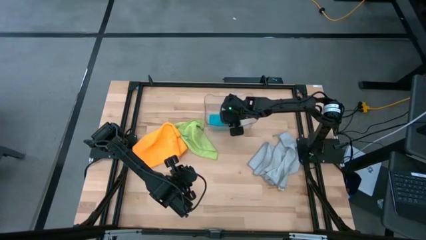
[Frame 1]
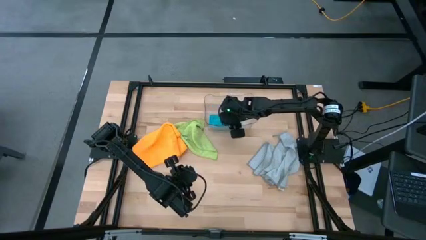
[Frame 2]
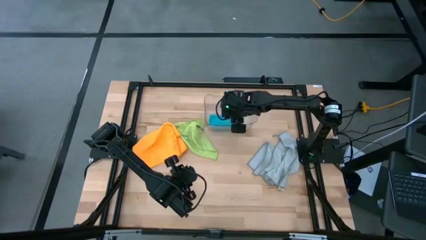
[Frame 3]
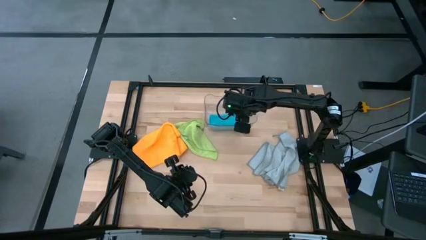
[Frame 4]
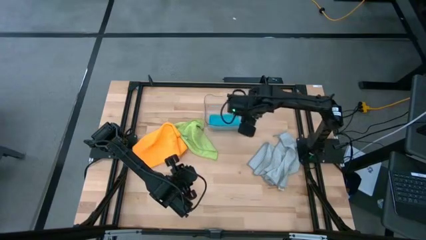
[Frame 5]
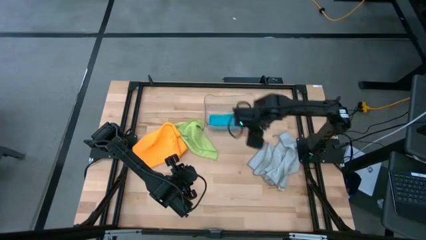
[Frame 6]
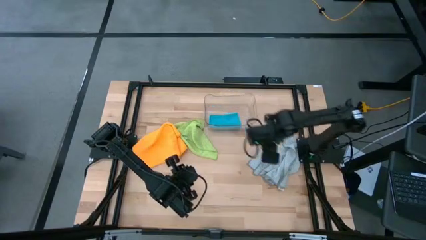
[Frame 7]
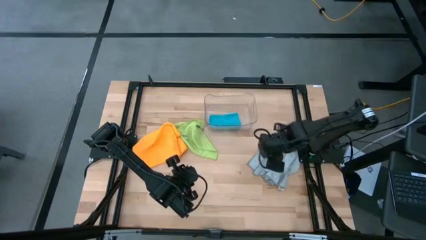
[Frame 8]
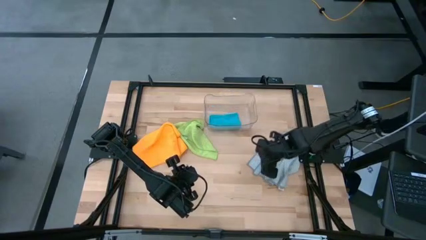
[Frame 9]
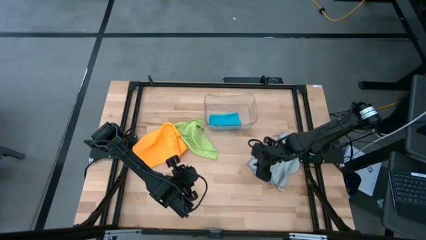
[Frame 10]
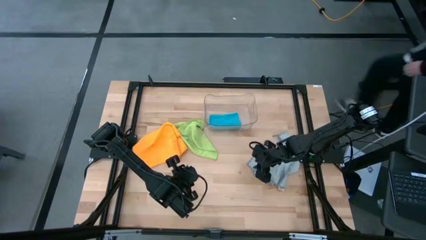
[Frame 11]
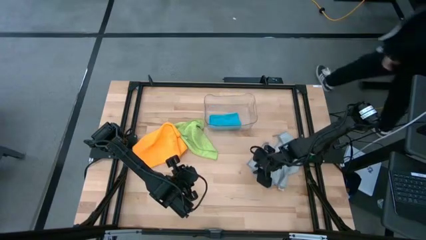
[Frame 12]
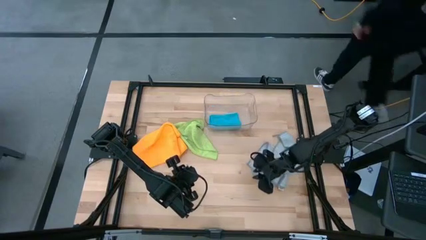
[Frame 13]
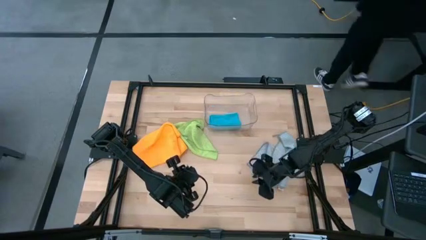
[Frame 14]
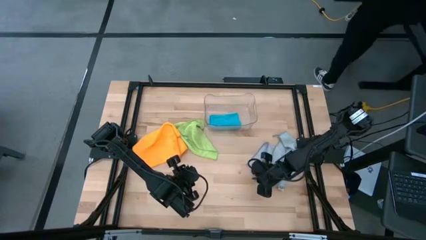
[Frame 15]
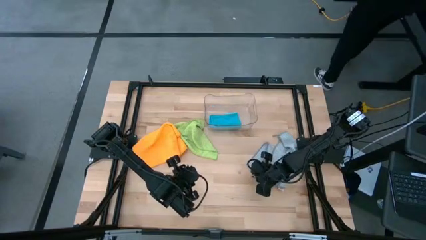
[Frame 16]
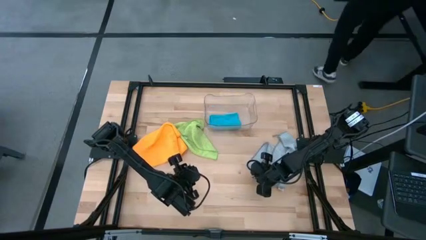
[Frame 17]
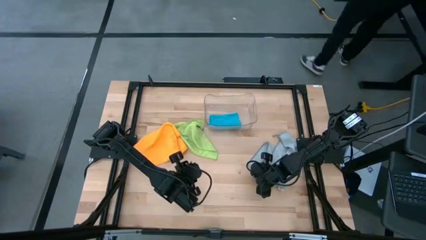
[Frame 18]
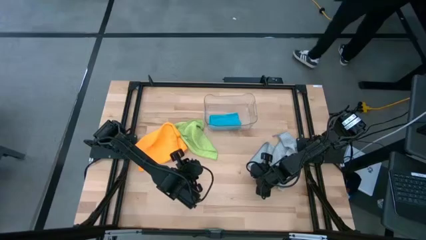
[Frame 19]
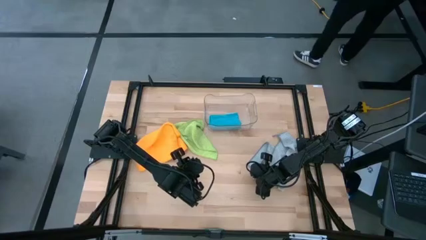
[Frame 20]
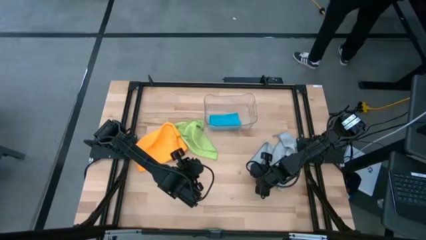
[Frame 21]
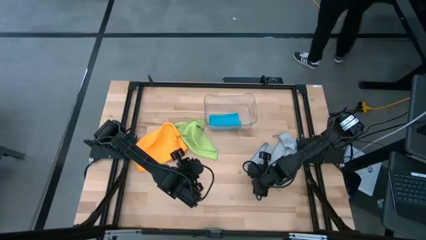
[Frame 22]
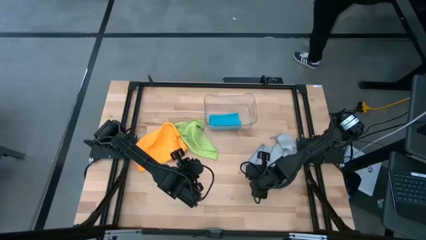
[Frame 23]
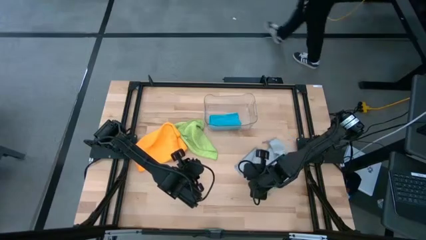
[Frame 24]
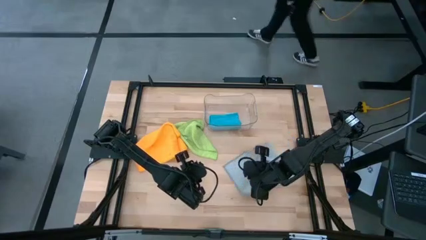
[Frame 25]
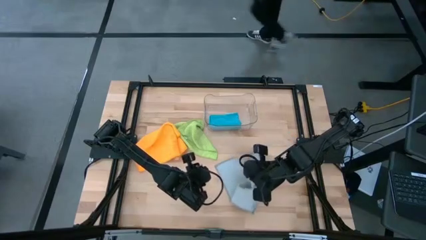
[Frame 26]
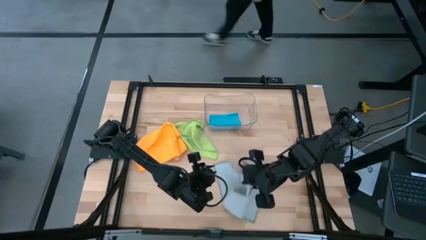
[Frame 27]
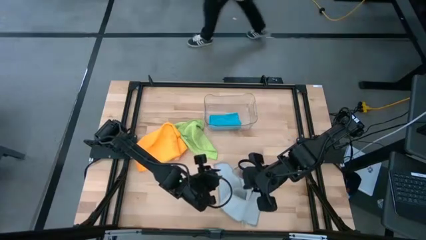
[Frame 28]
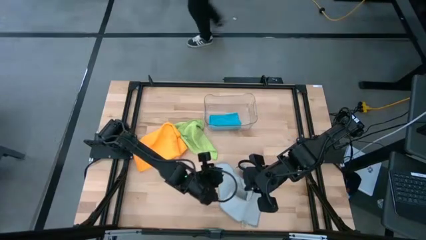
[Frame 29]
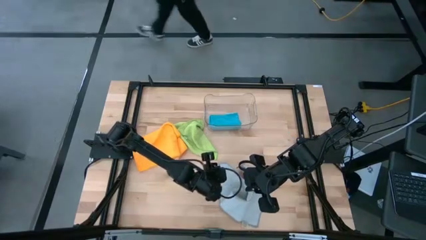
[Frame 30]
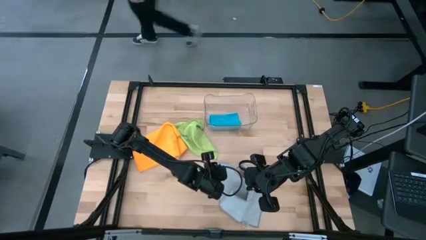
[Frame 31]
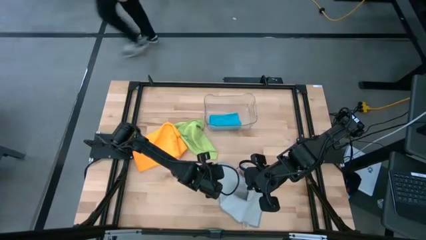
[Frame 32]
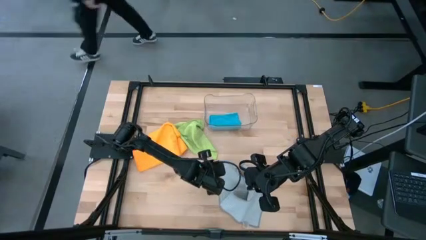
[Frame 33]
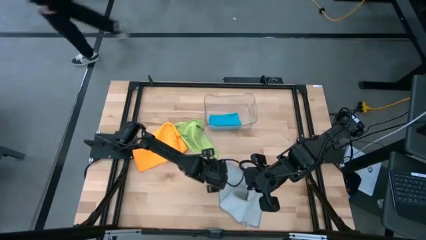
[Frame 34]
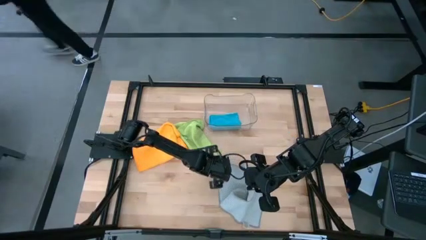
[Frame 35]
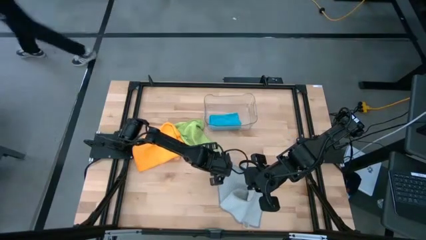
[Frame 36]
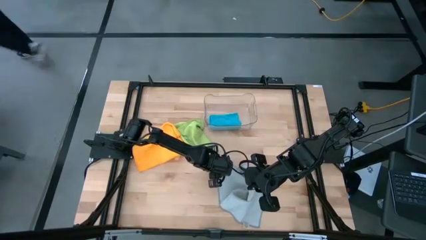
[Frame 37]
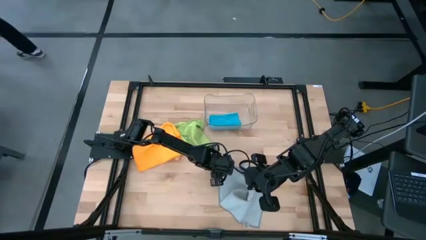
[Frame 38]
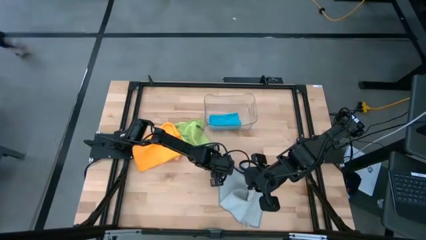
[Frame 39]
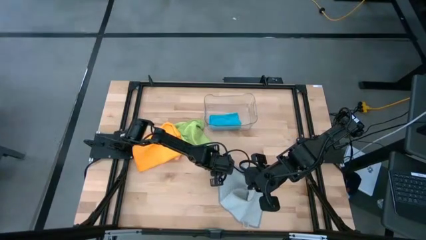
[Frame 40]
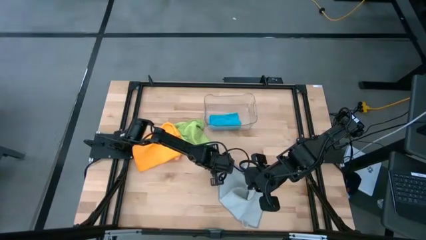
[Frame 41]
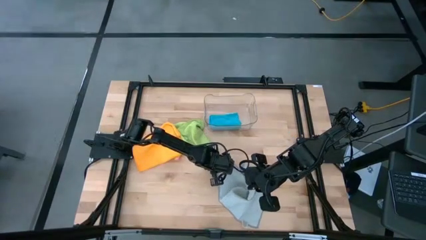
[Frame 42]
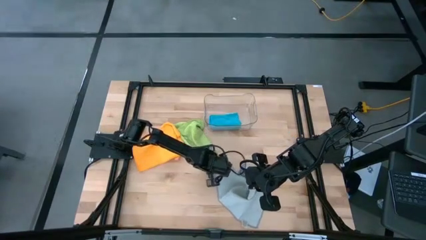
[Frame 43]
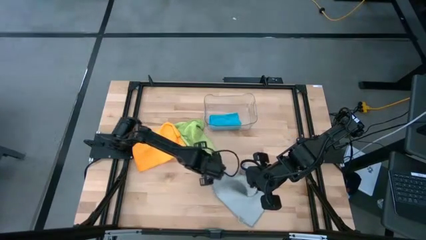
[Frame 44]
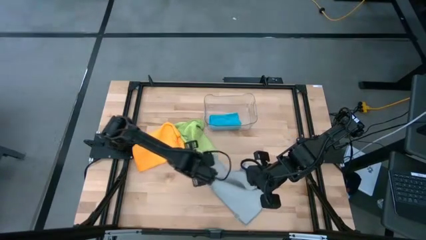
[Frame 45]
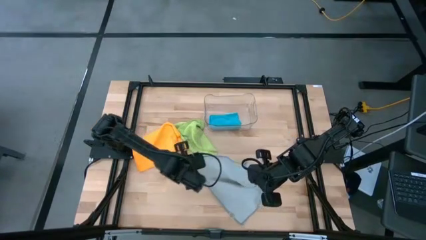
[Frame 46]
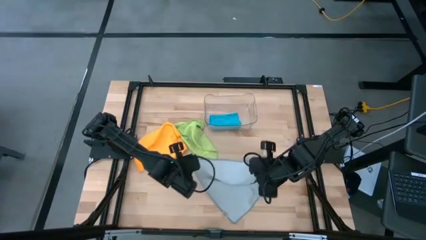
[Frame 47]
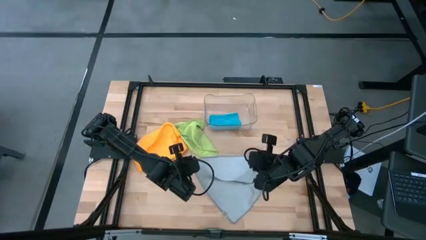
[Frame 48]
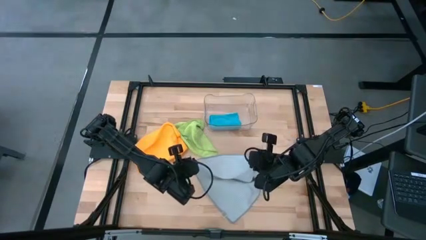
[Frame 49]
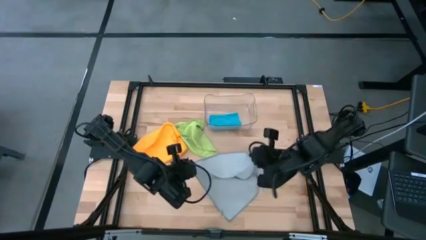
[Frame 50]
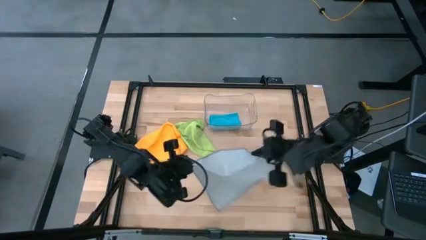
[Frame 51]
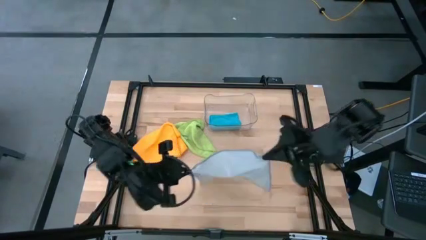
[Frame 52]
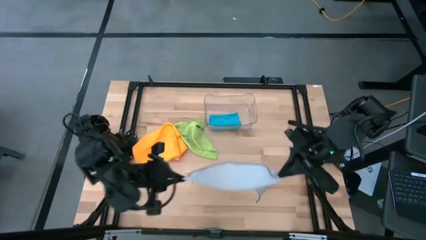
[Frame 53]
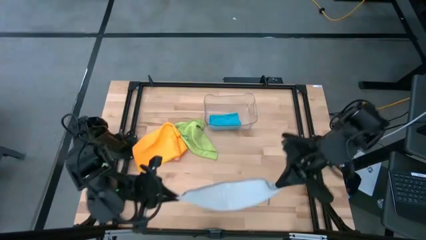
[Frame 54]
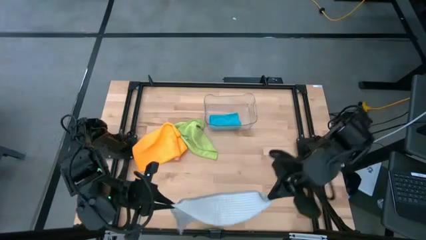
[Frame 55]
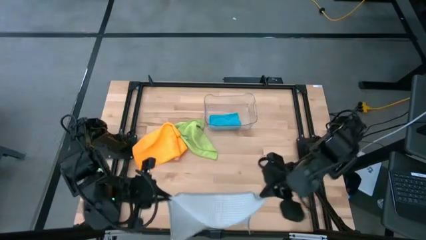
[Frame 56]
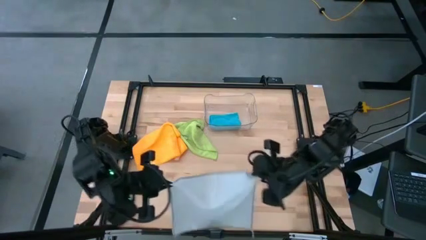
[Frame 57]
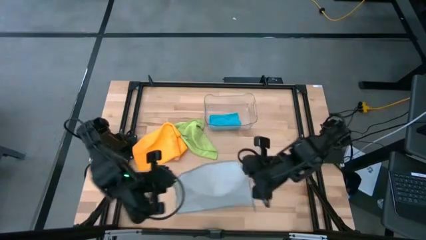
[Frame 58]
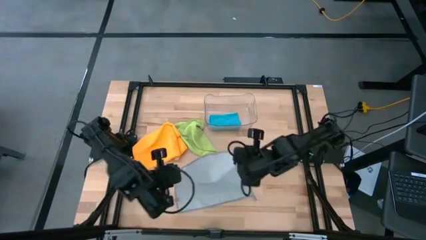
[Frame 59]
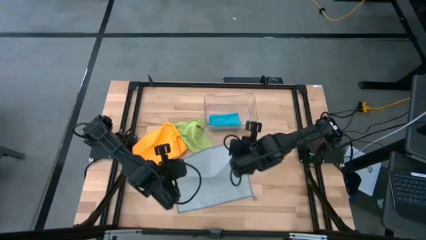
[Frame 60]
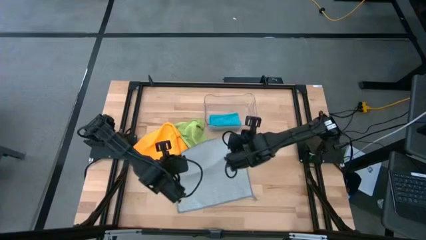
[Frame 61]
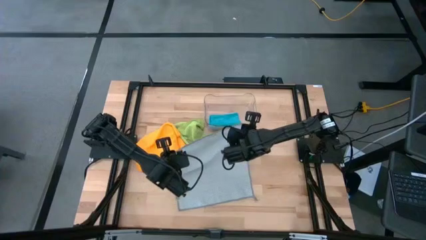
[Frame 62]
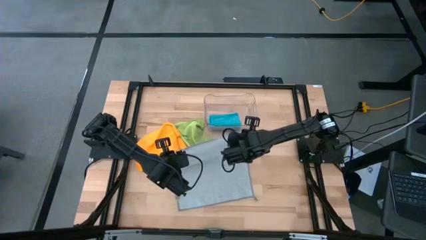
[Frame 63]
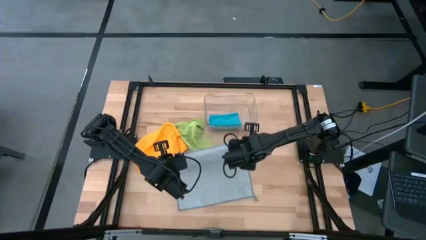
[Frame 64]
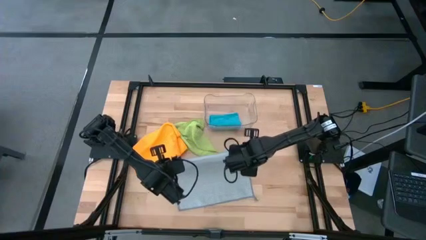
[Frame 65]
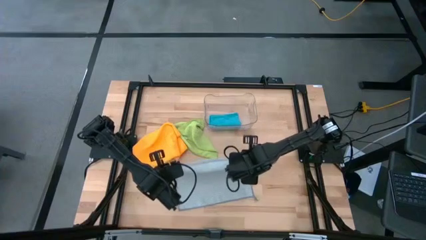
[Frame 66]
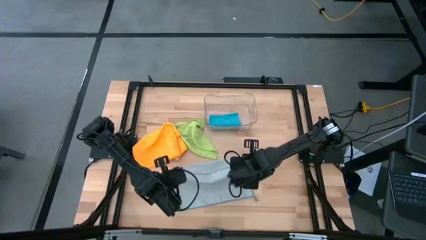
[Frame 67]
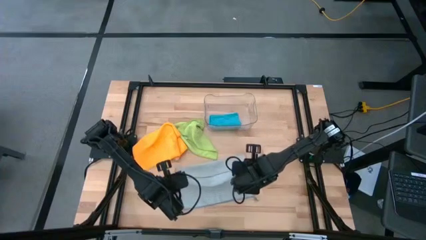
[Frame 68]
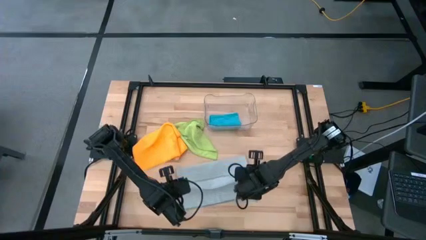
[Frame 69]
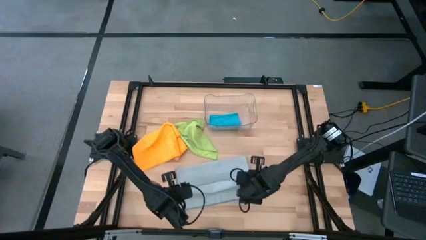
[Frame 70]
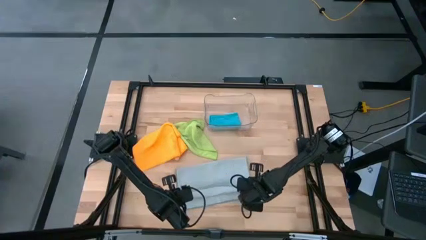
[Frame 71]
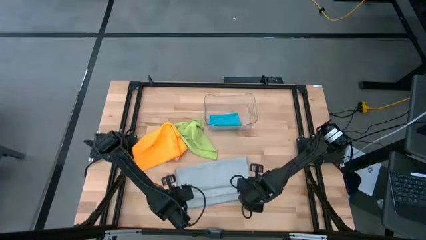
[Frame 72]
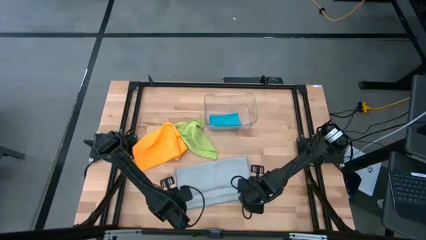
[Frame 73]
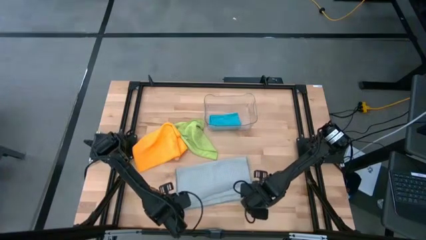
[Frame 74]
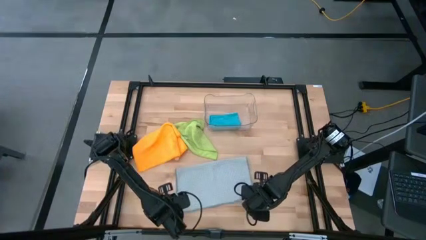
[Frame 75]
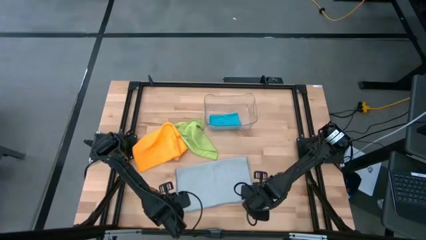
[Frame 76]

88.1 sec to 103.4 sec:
Task: Fold microfiber towels
Fold the gray towel

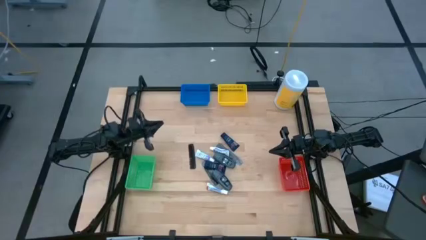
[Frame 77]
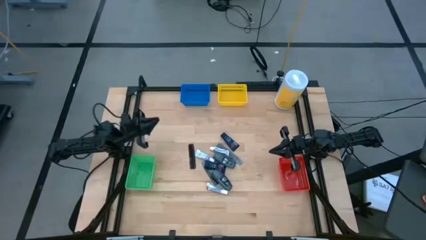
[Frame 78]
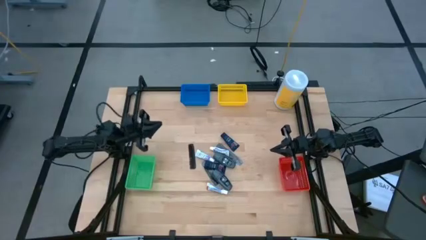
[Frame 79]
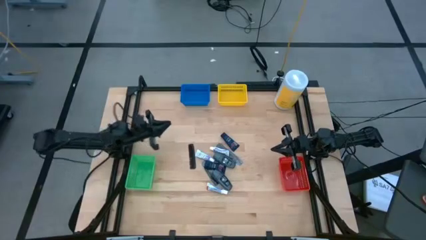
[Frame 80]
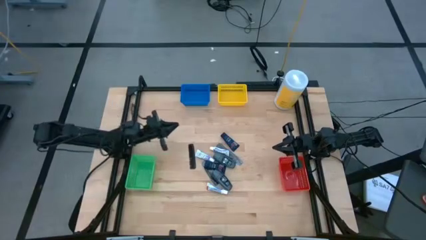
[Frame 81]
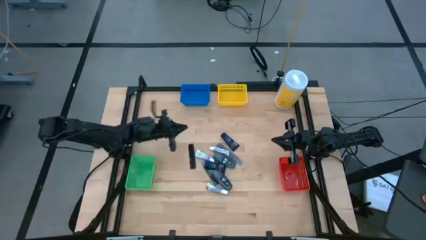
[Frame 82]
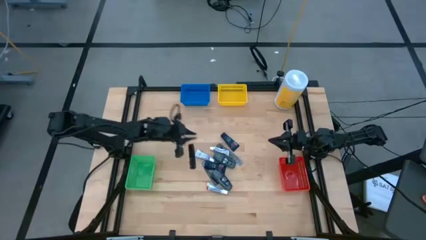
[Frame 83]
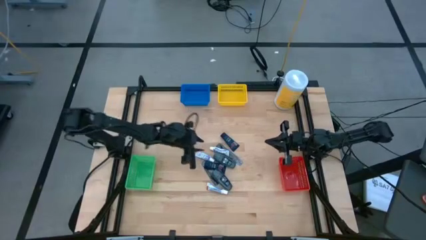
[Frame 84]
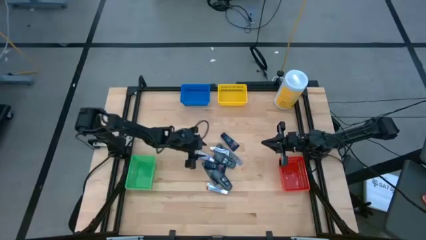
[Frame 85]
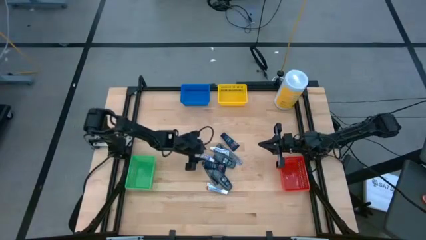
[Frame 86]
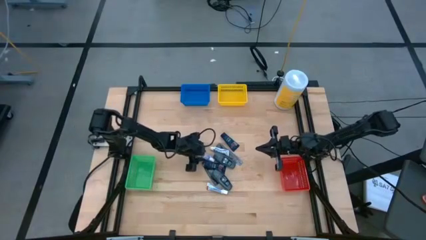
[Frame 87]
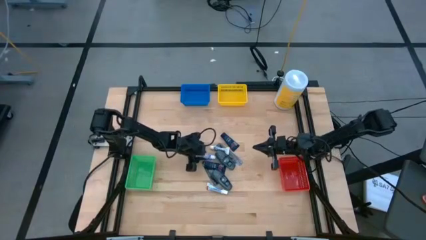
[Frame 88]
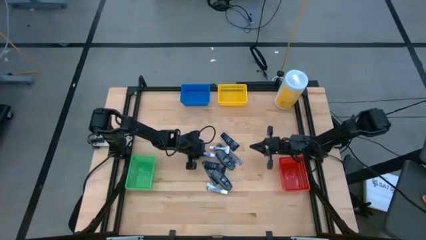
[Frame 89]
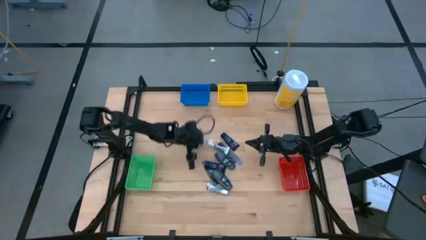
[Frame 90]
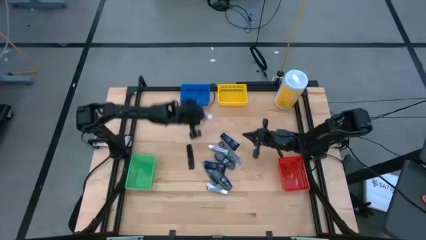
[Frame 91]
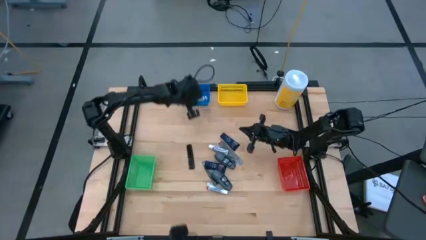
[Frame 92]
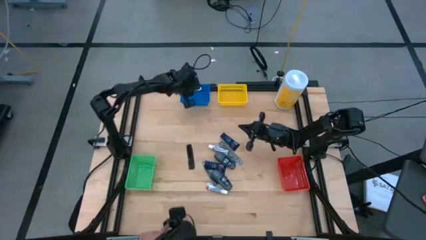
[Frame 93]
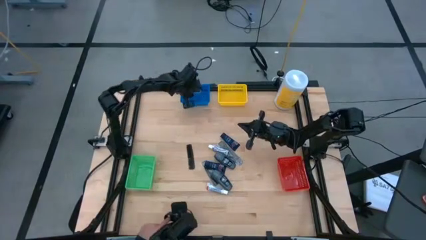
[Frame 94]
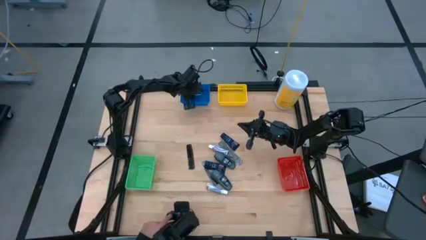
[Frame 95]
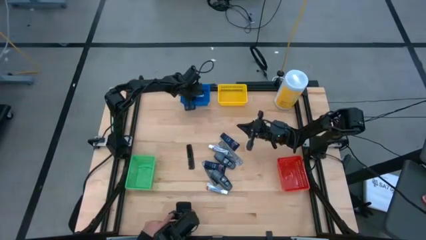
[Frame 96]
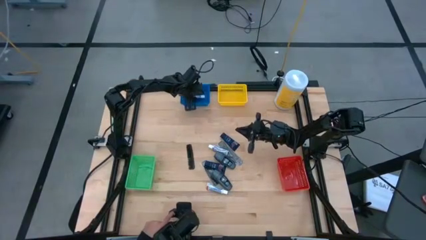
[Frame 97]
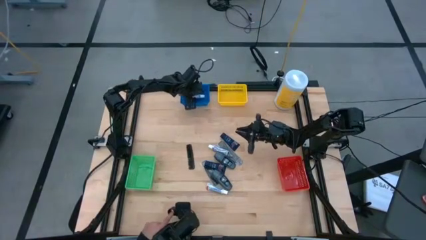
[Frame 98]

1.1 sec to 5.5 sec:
Task: Pick & Place Travel size toiletries
Put the white toothpaste into the blue bin
